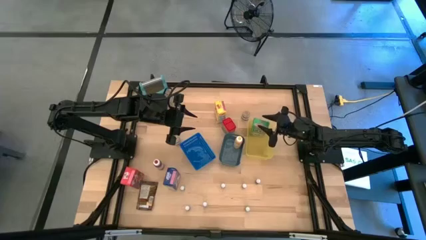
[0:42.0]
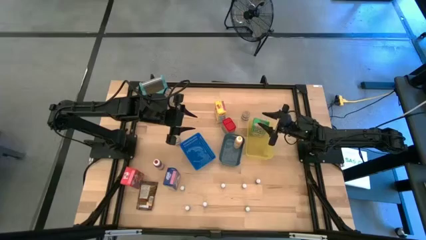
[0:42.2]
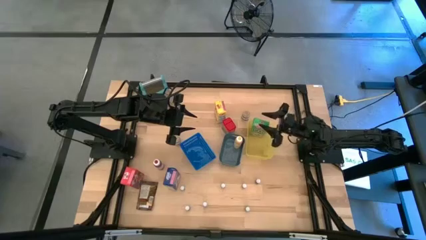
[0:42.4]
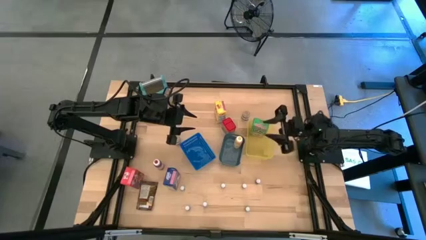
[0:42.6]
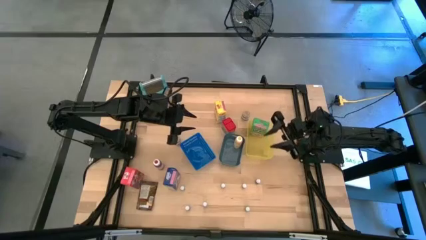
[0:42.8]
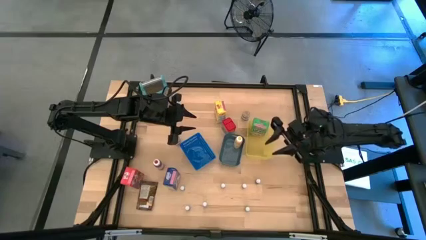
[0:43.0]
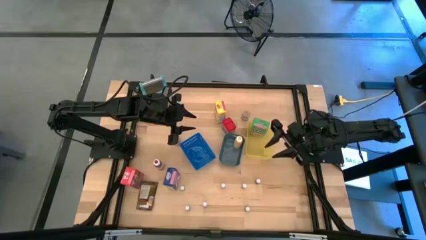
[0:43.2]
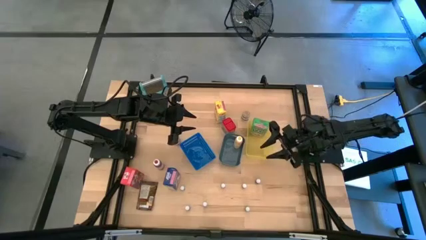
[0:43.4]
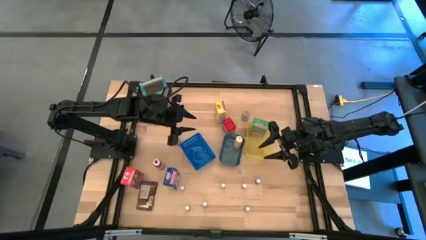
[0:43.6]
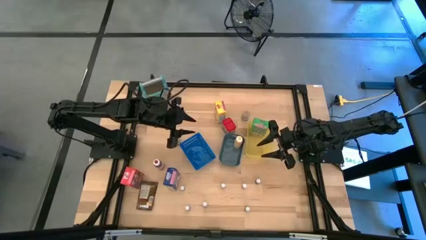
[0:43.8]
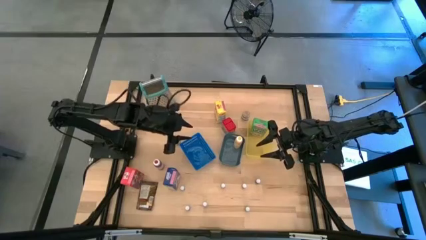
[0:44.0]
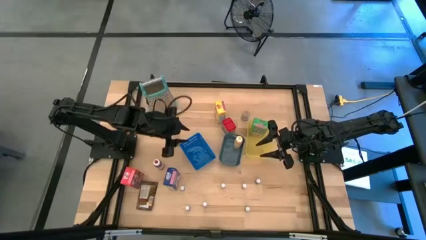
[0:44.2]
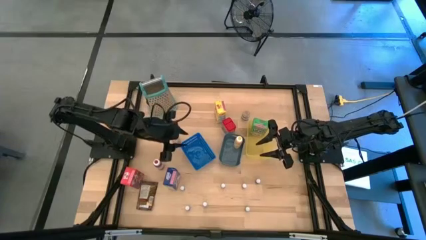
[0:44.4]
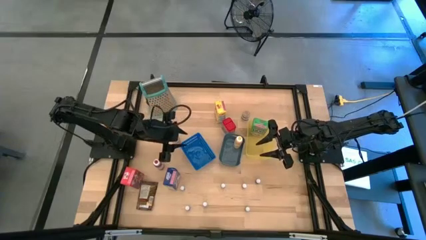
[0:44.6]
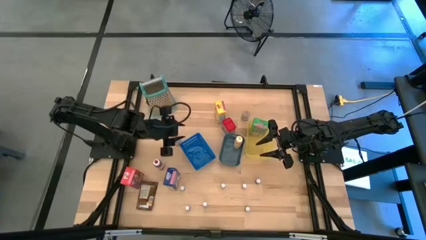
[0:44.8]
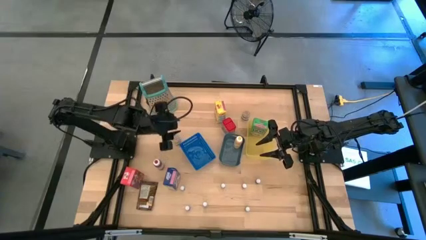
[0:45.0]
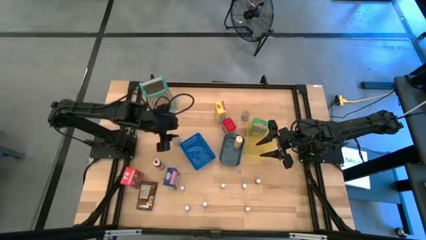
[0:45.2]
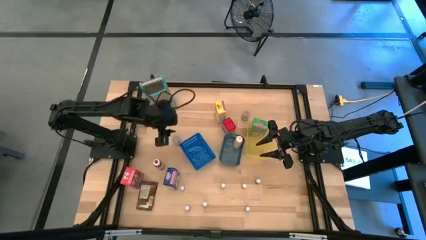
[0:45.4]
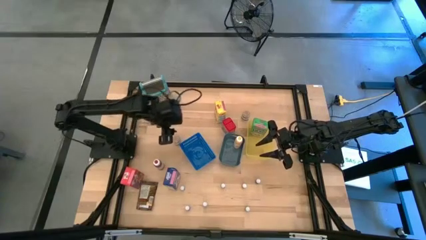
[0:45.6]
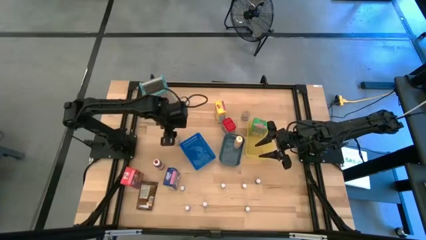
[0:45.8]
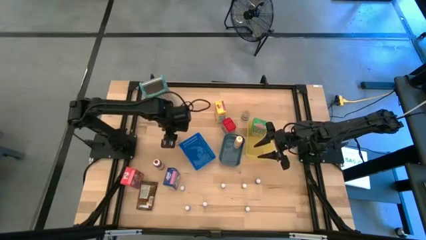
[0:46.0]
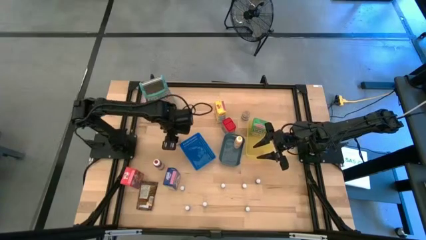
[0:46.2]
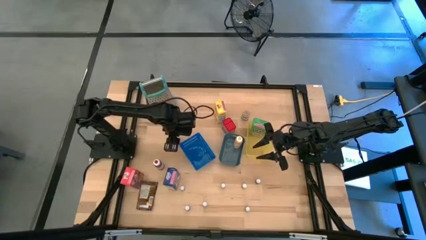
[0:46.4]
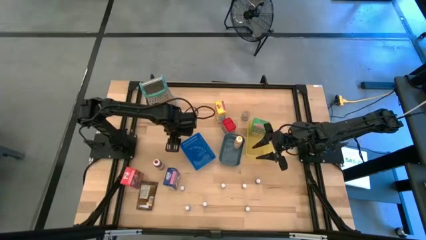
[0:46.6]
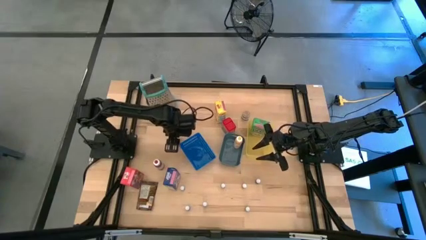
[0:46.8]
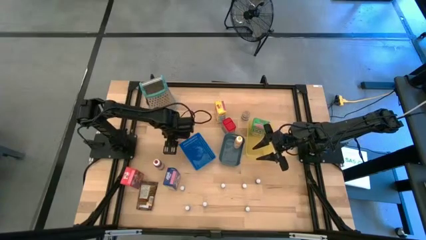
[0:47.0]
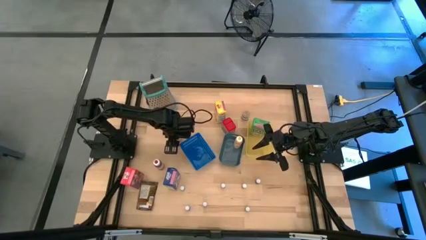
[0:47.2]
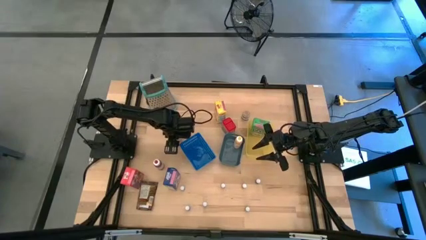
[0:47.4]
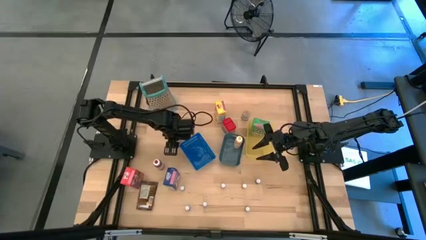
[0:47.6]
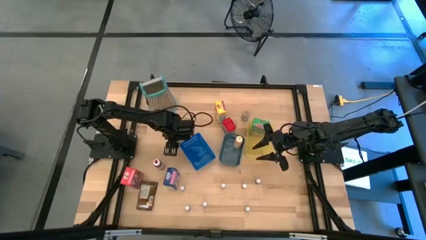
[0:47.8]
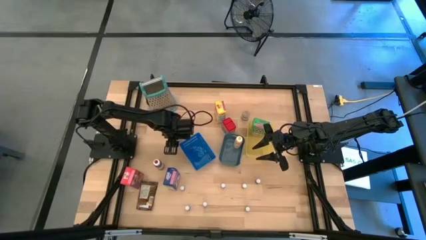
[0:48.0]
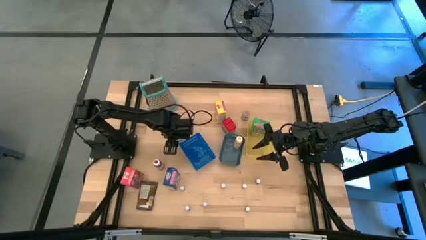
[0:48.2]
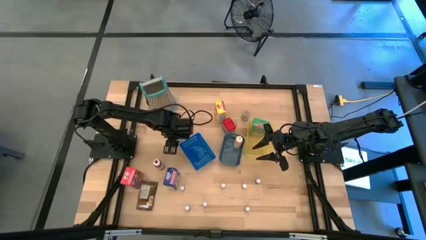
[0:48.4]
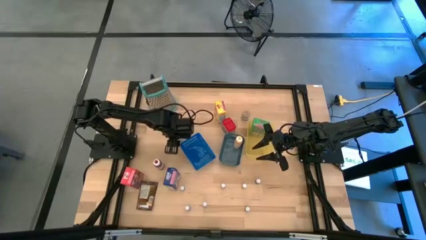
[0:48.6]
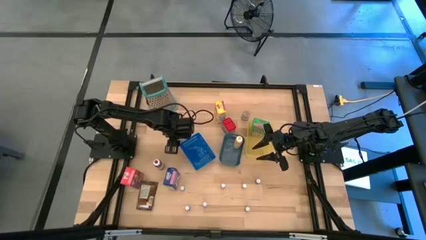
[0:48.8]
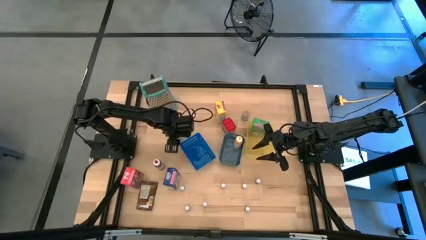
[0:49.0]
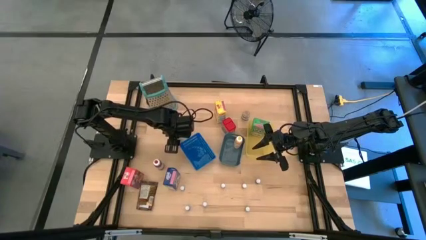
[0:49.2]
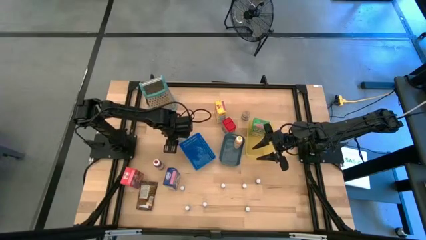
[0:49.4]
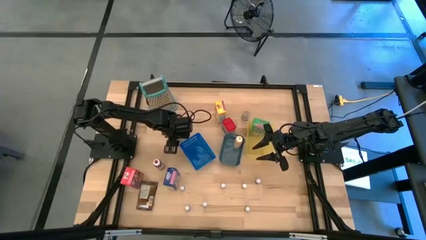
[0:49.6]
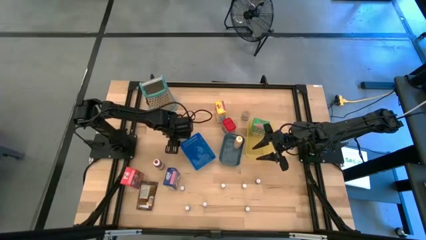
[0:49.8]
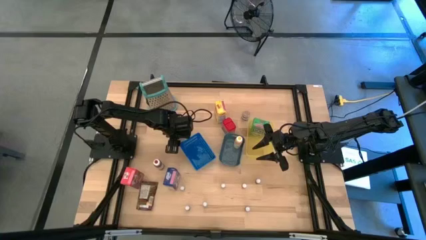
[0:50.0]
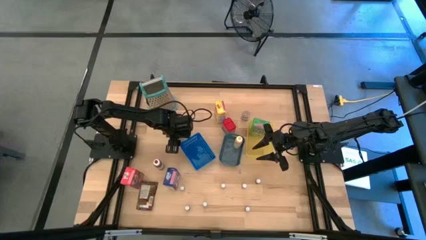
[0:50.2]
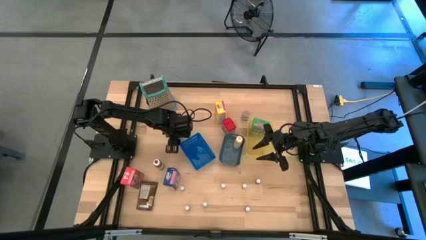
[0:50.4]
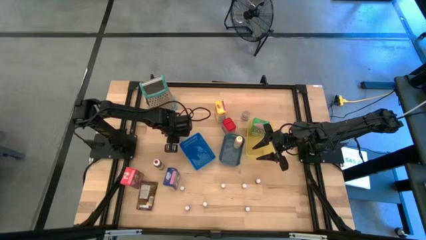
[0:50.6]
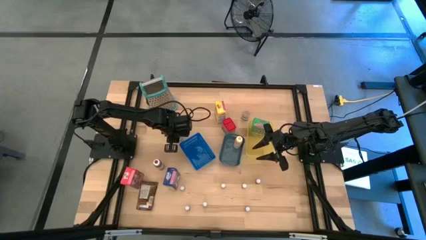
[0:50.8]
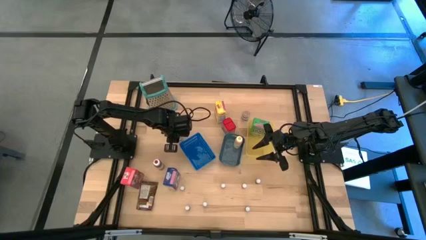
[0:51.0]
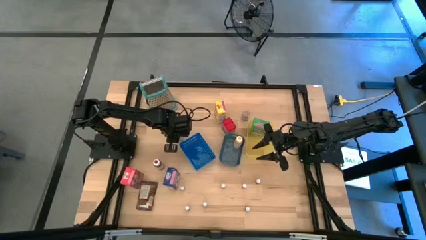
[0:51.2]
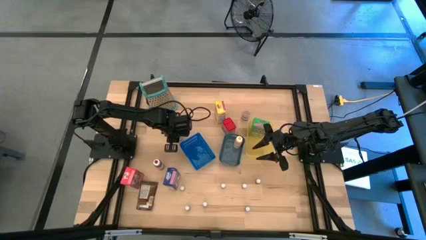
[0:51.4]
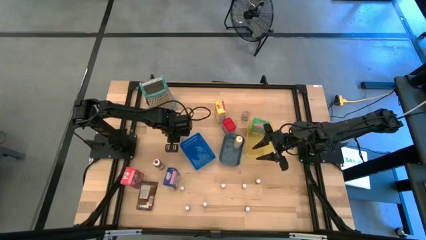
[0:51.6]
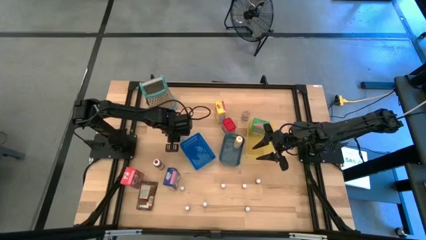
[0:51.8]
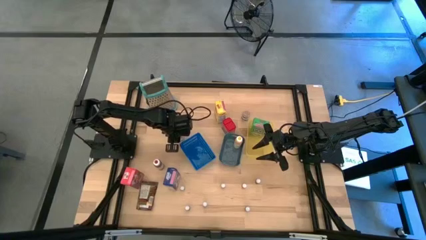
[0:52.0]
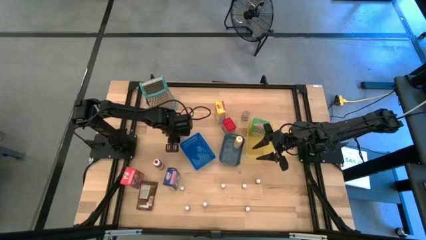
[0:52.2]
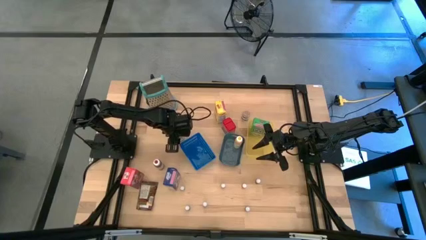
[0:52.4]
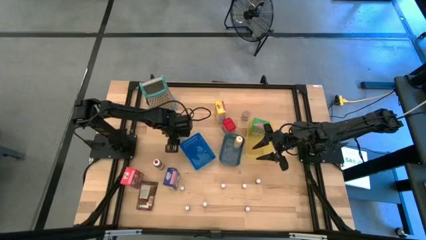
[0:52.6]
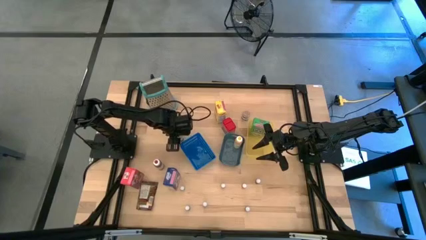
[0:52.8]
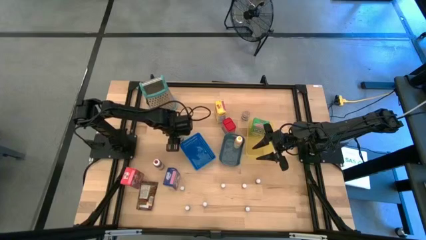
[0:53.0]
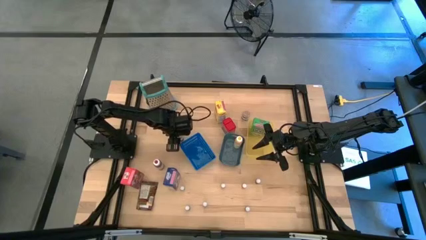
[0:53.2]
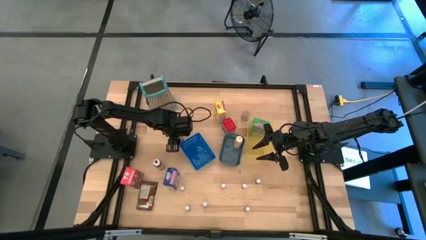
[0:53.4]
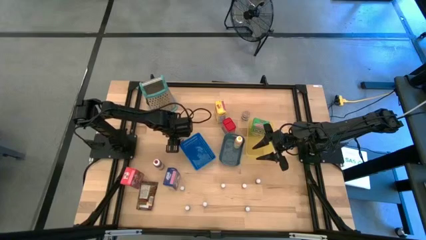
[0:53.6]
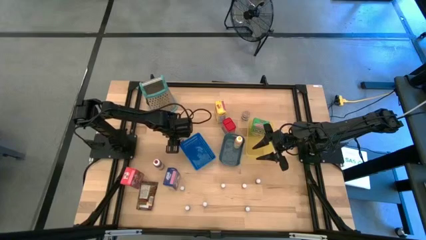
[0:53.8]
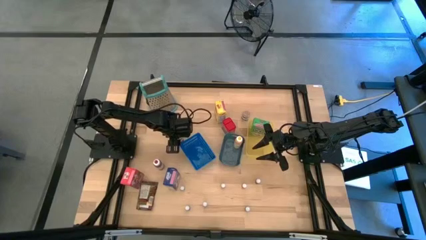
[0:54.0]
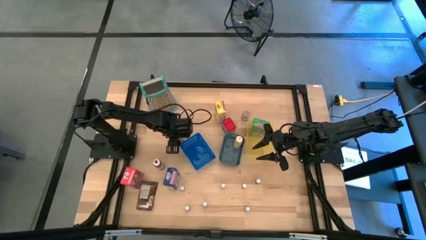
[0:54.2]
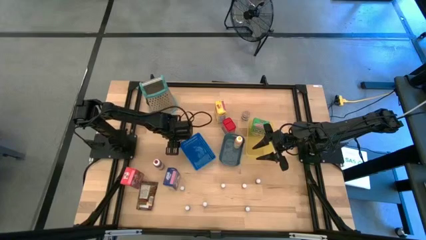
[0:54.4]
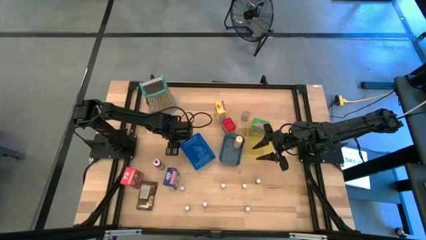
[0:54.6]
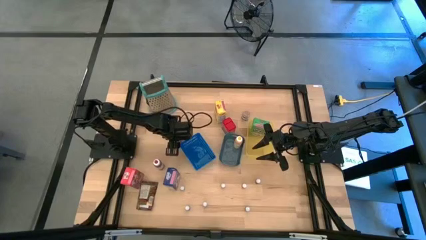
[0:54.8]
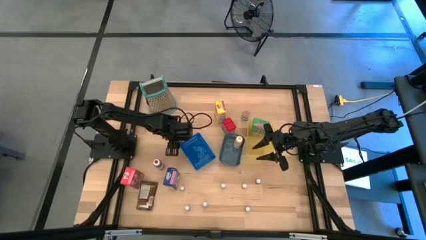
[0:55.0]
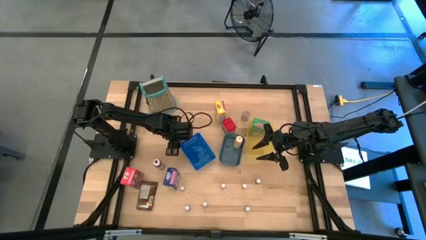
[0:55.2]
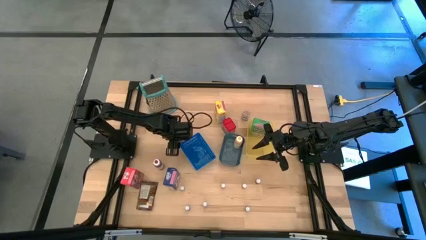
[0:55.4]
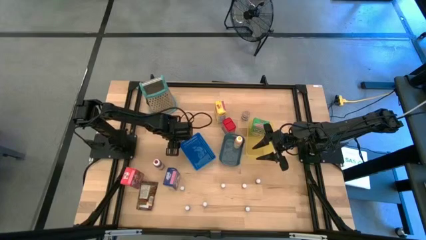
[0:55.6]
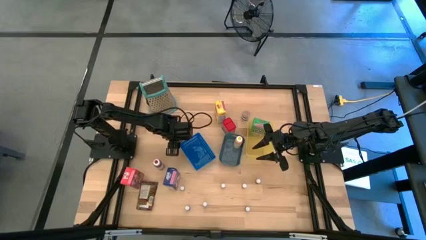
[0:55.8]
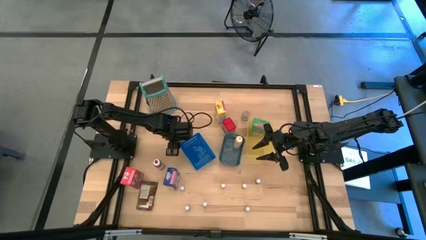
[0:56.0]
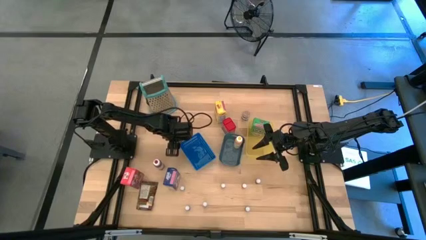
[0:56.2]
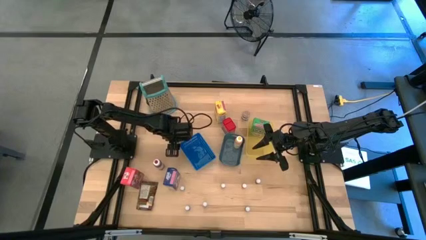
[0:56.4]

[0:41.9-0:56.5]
Task: Pick & Place Kitchen Items
Put the brown seasoning bottle into the blue bin
